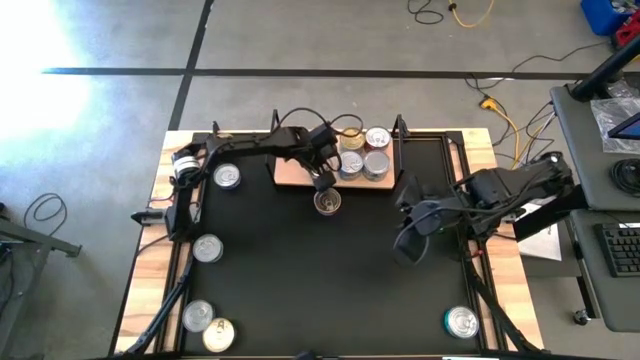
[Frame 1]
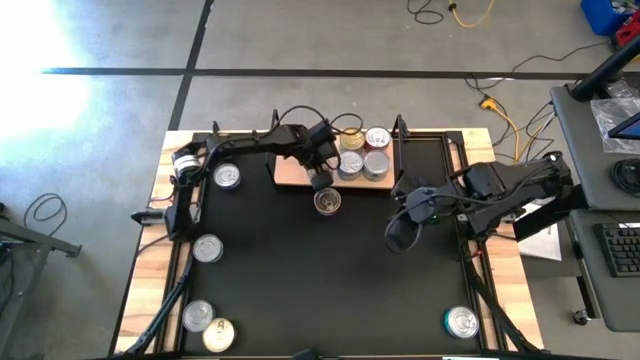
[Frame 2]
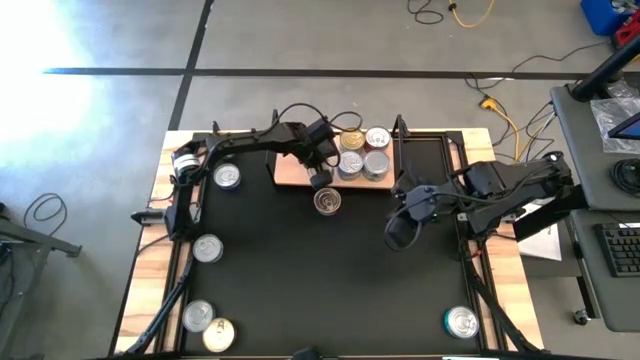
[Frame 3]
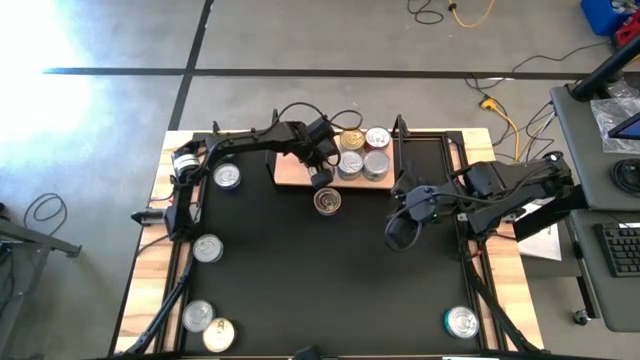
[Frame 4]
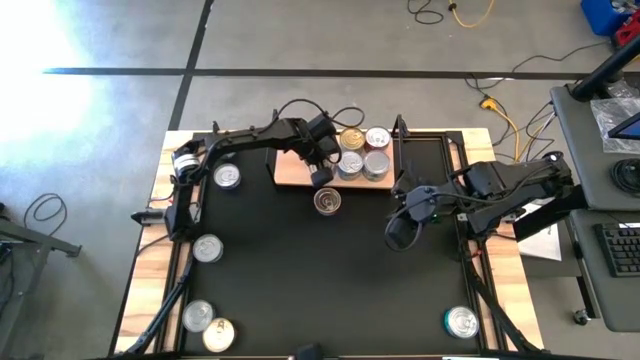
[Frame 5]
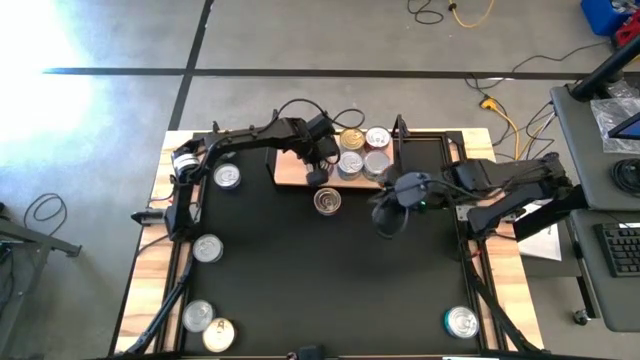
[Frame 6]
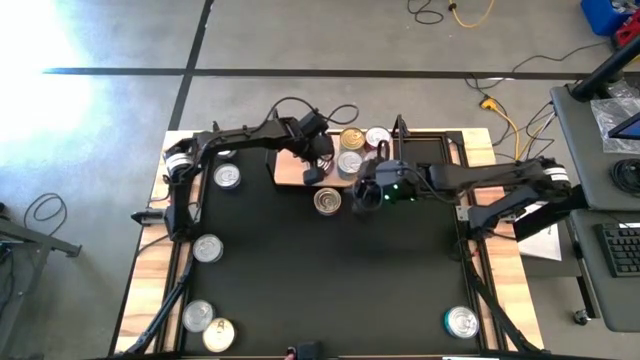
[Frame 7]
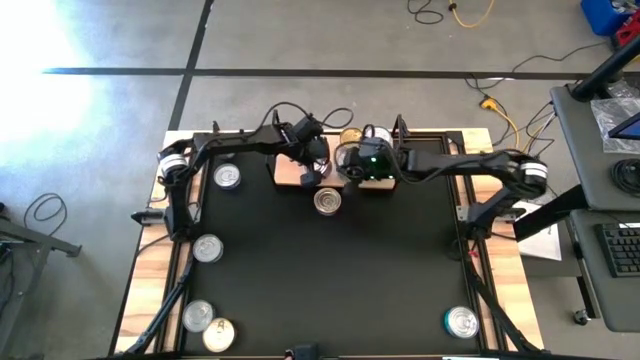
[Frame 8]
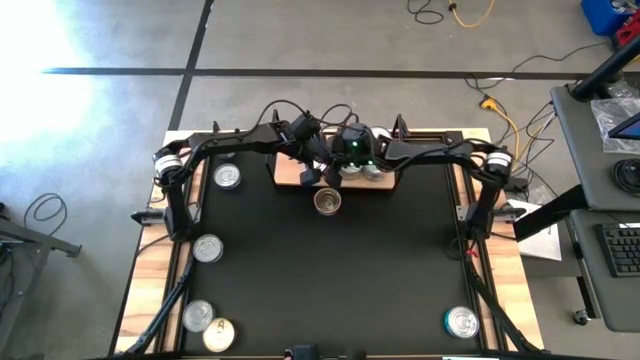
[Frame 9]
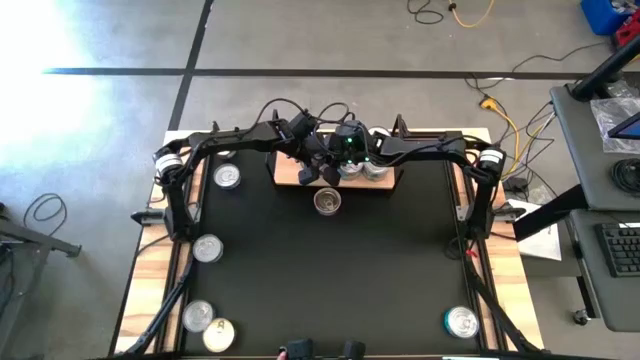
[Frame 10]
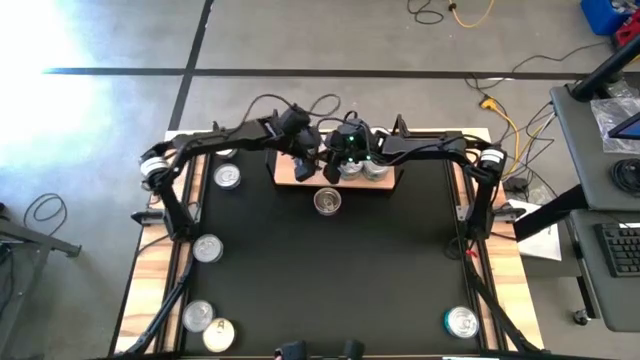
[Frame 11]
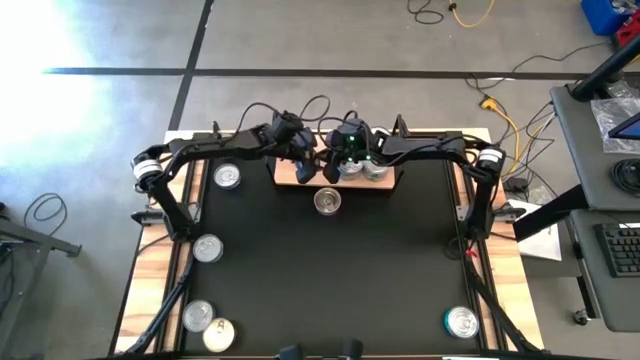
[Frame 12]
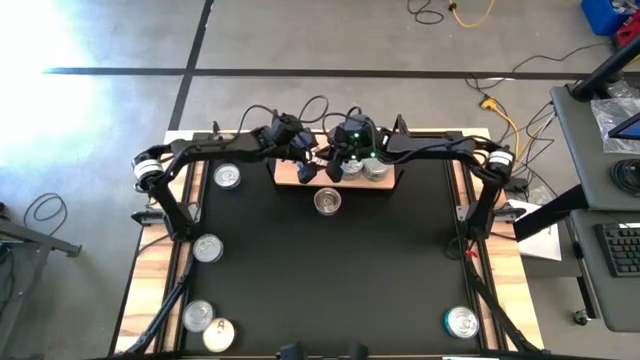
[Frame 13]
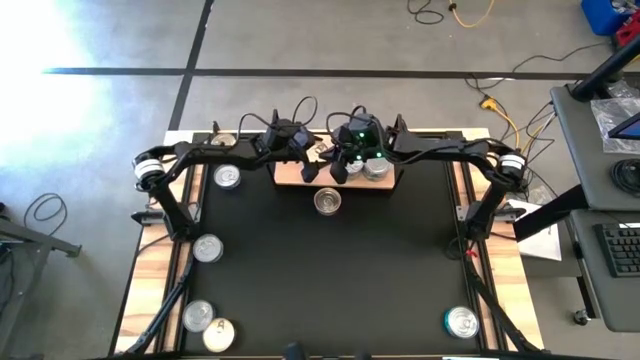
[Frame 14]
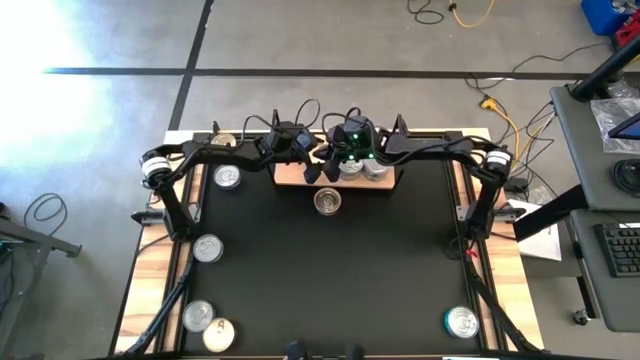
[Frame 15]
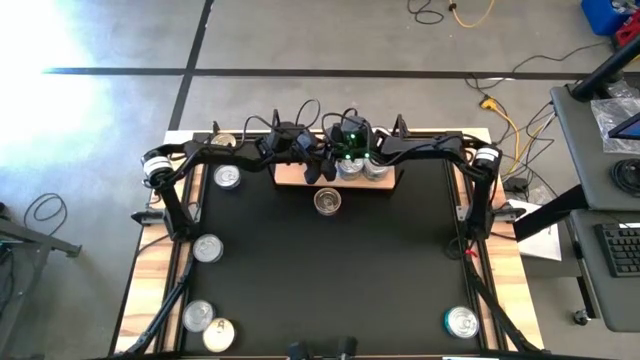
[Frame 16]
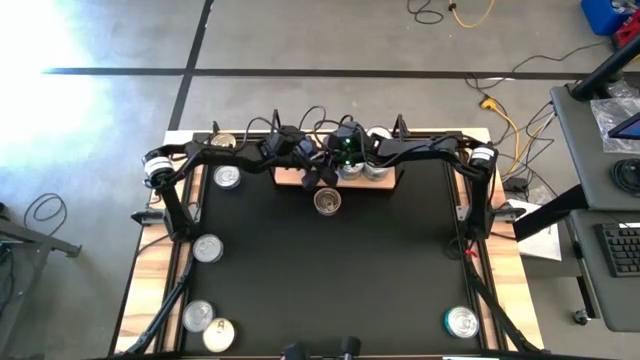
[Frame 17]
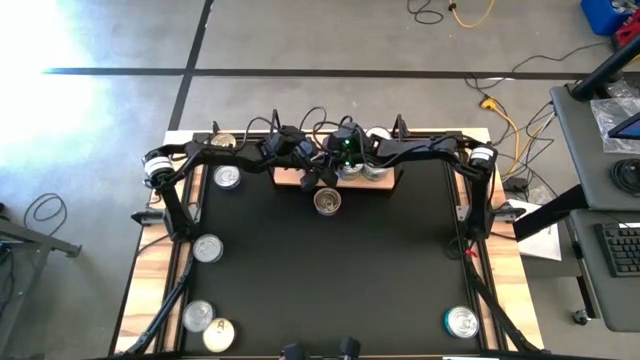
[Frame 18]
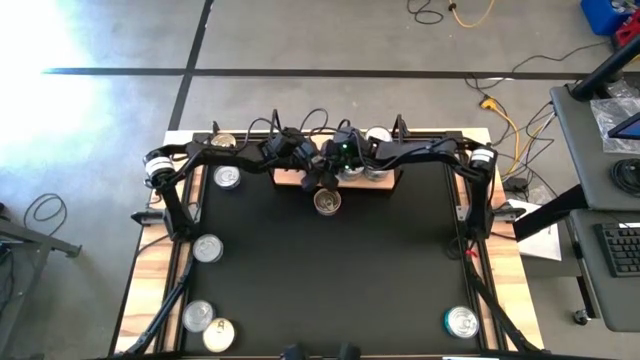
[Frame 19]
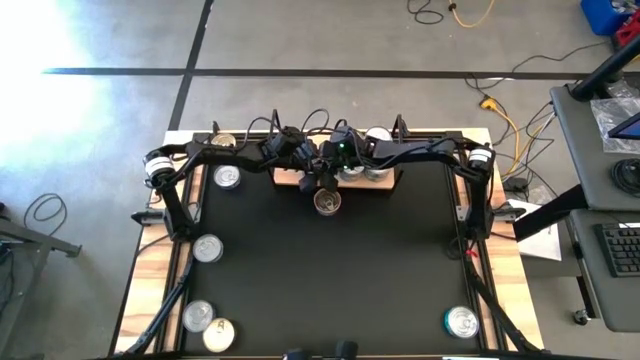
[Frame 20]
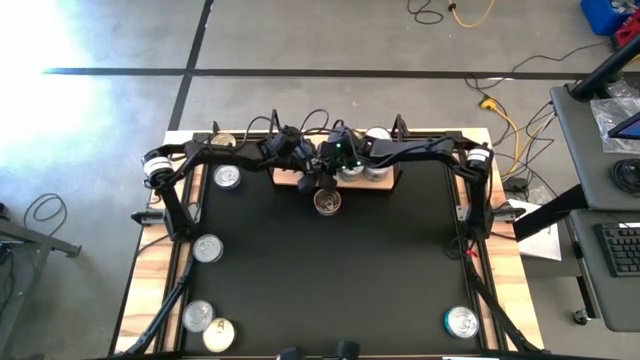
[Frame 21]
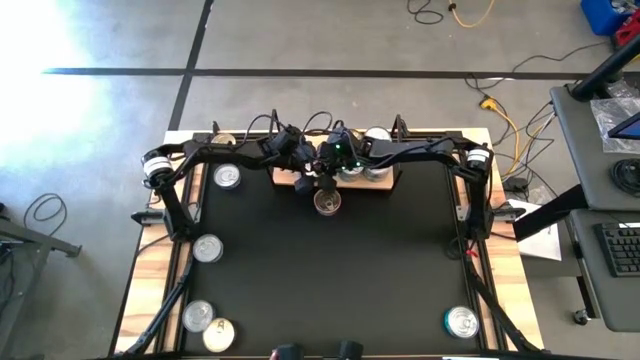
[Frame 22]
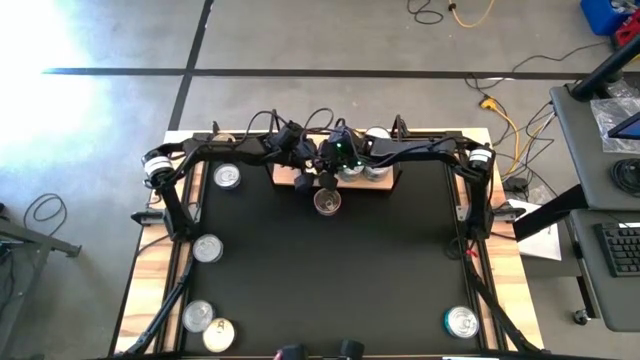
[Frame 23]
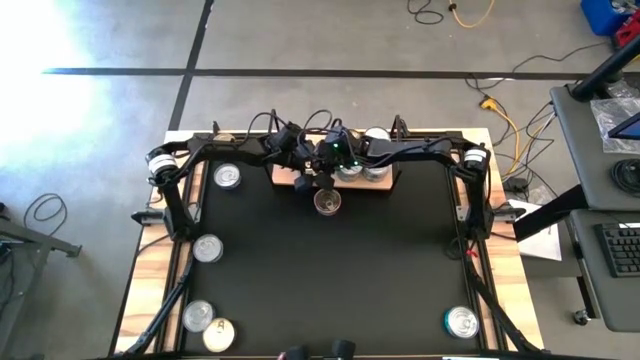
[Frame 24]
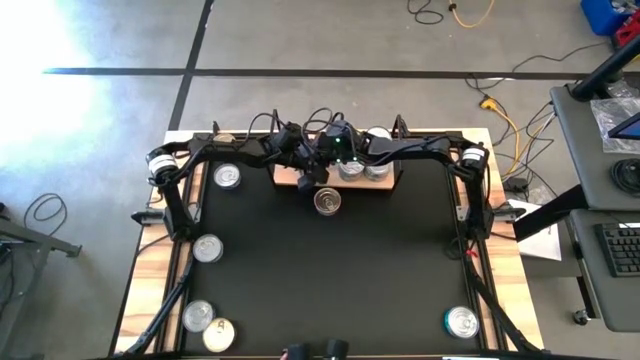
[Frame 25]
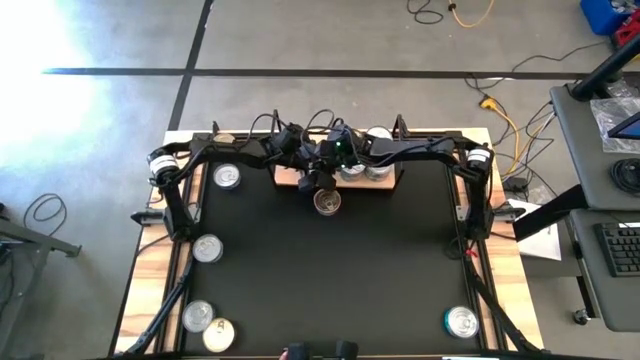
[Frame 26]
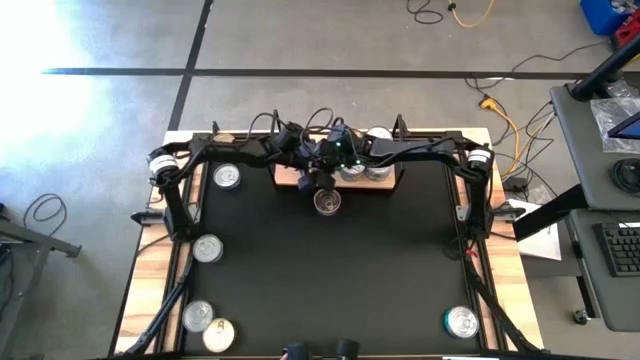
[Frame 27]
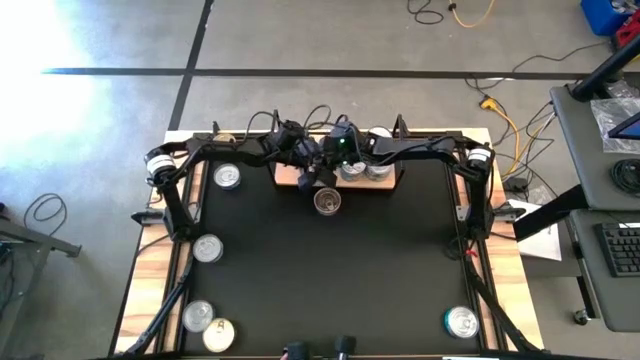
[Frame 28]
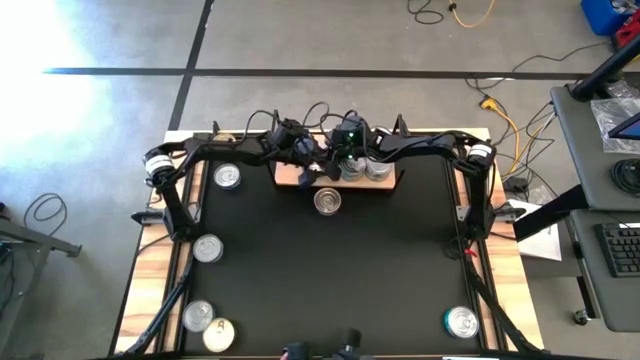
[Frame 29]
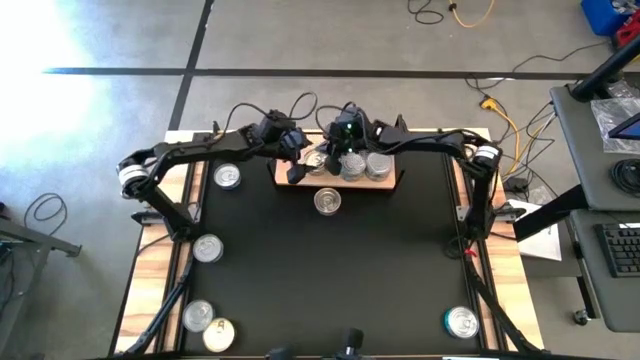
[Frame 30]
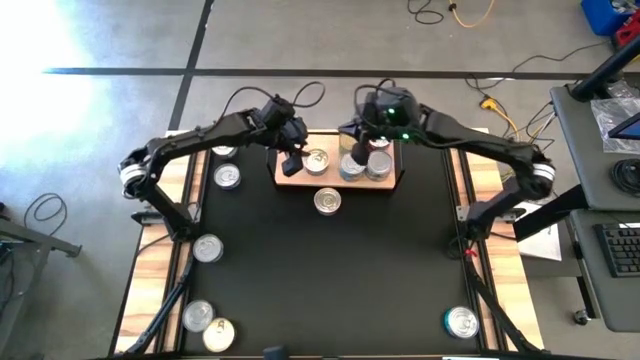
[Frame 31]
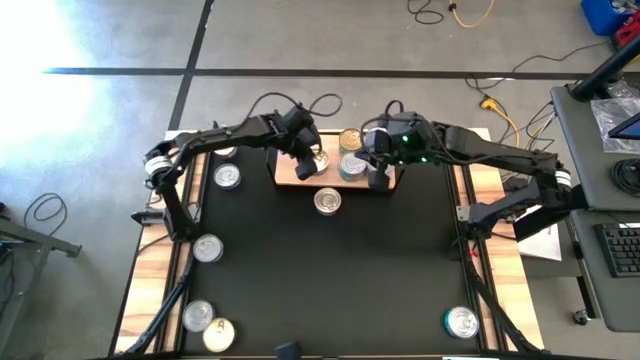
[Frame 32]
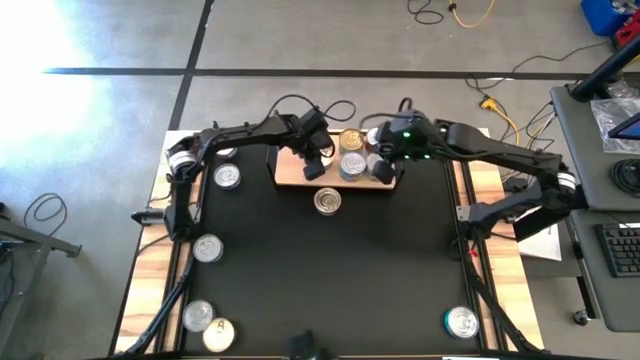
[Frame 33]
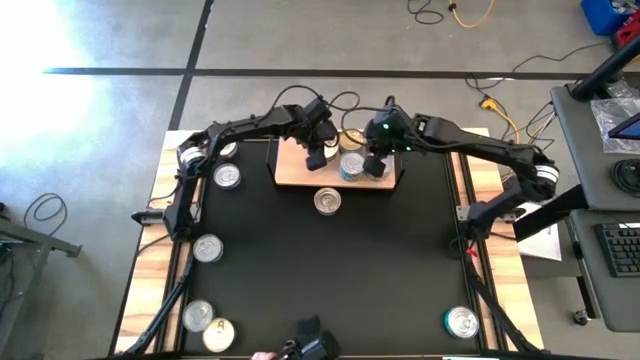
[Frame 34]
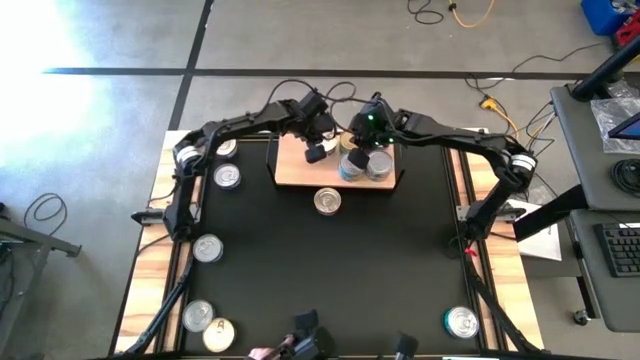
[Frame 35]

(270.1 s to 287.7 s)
Task: Stack canned seafood by type on shelf
Put the blue-pink tuna can on the shelf
